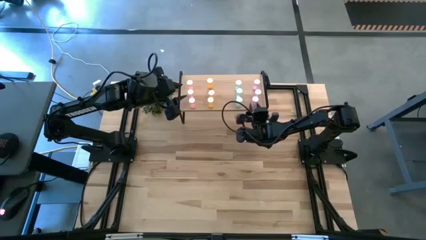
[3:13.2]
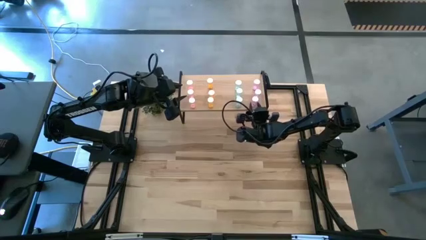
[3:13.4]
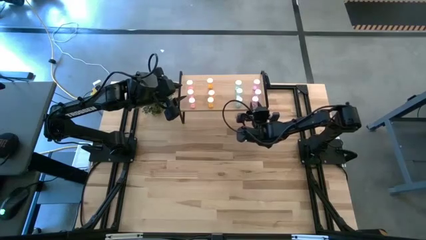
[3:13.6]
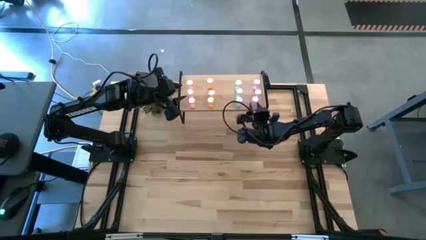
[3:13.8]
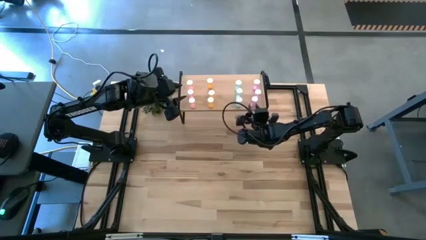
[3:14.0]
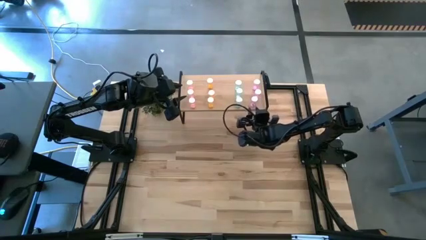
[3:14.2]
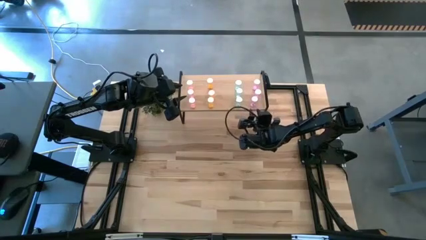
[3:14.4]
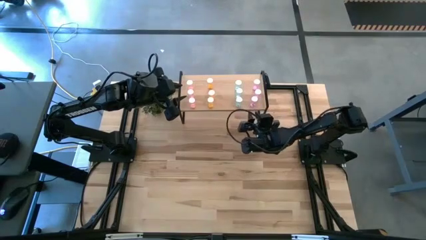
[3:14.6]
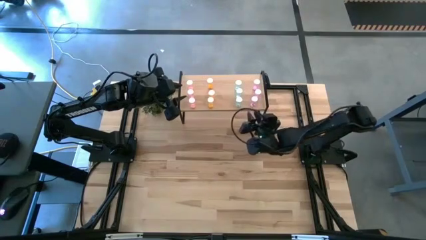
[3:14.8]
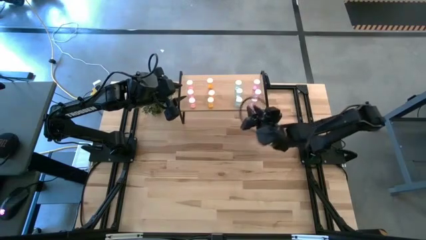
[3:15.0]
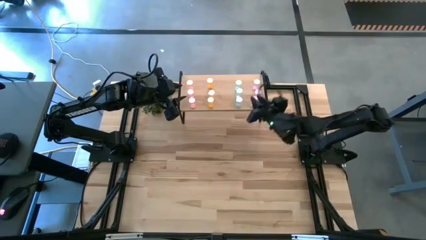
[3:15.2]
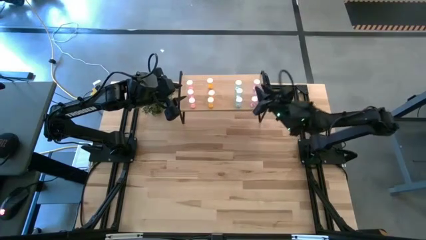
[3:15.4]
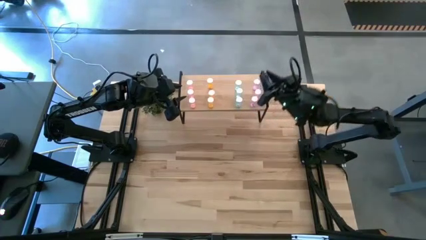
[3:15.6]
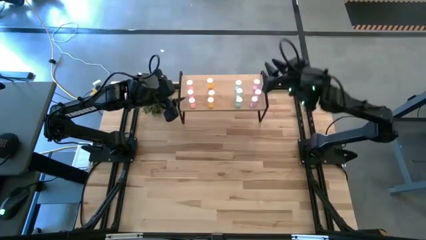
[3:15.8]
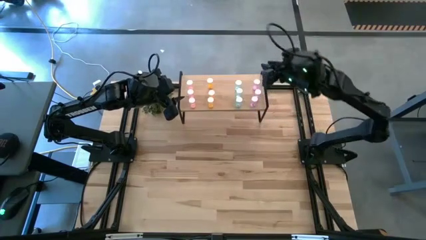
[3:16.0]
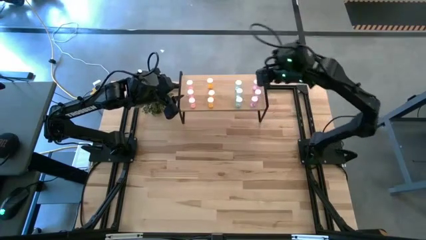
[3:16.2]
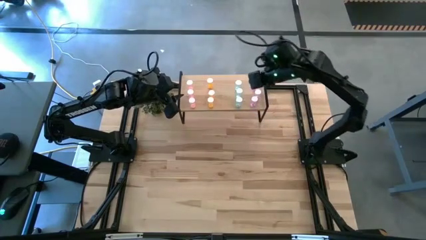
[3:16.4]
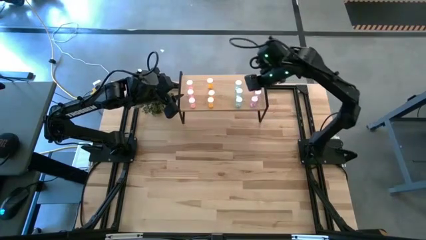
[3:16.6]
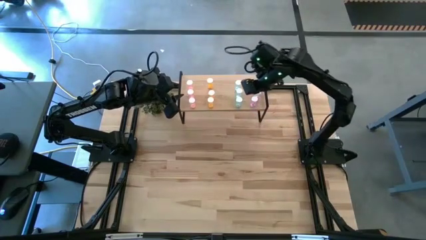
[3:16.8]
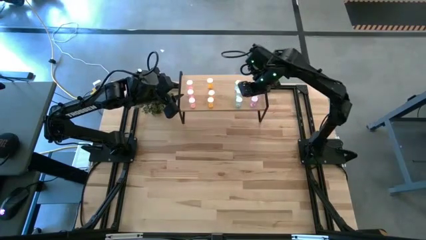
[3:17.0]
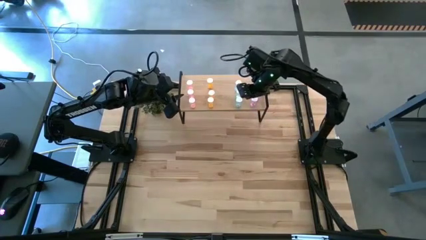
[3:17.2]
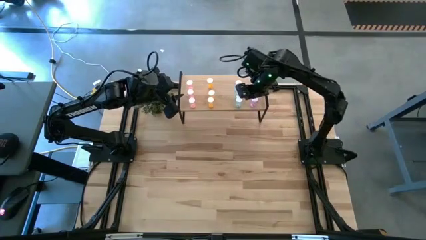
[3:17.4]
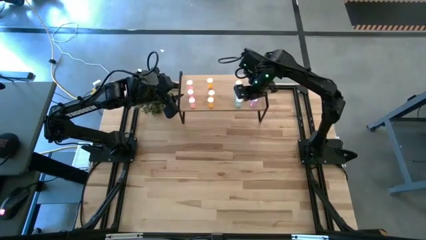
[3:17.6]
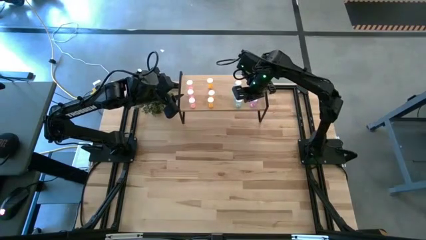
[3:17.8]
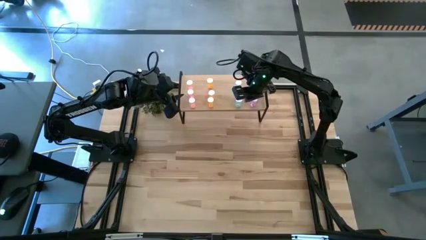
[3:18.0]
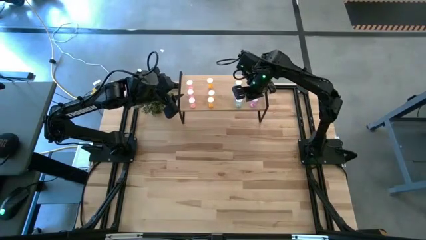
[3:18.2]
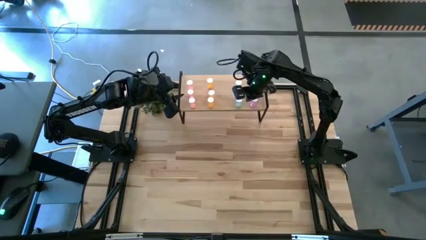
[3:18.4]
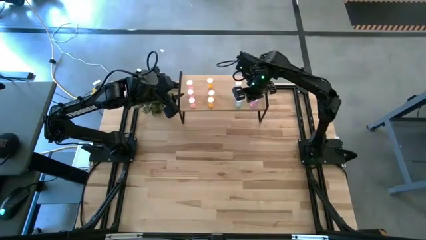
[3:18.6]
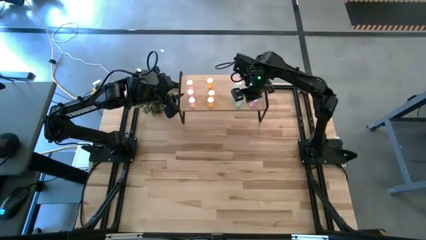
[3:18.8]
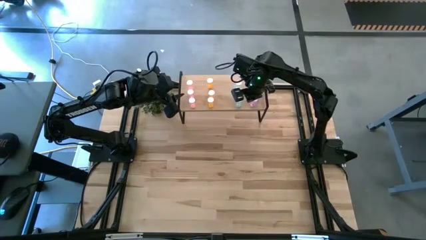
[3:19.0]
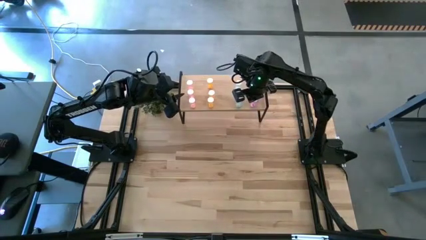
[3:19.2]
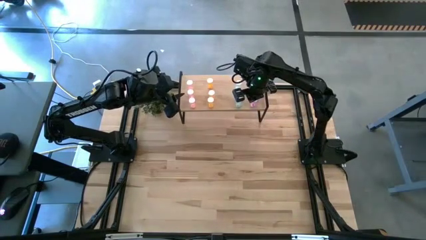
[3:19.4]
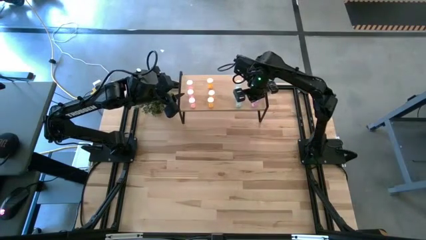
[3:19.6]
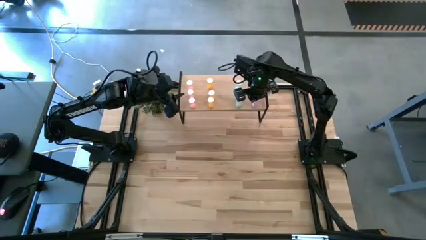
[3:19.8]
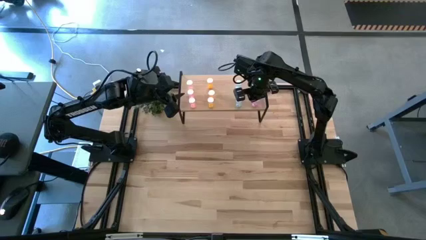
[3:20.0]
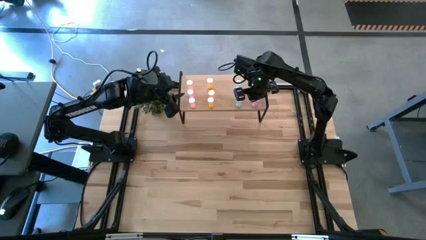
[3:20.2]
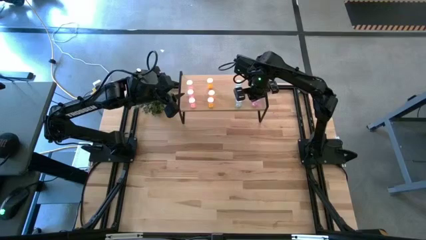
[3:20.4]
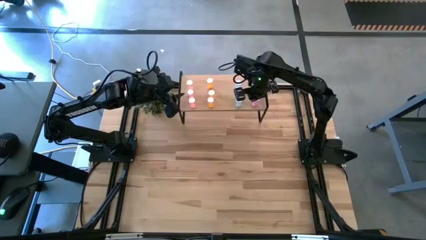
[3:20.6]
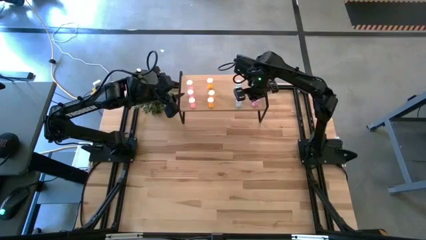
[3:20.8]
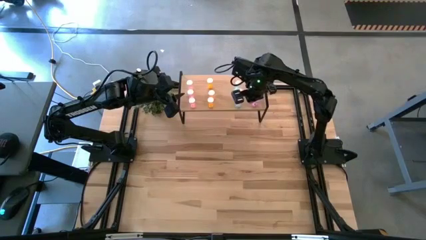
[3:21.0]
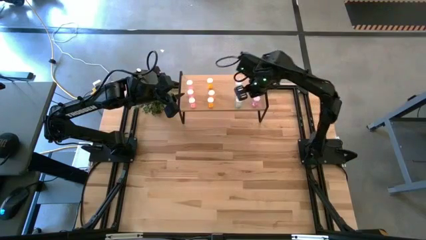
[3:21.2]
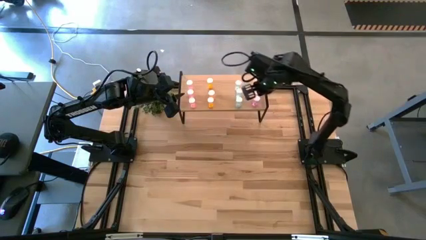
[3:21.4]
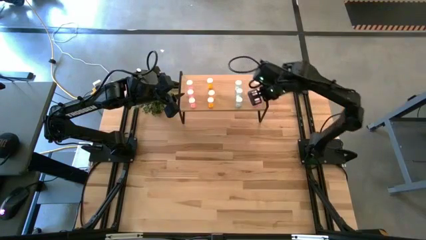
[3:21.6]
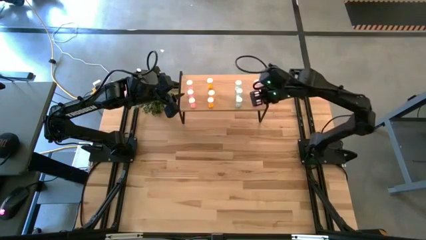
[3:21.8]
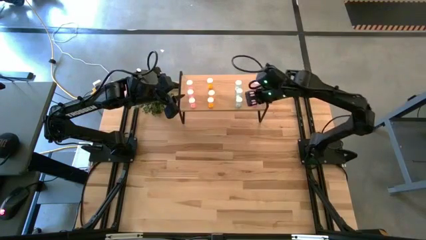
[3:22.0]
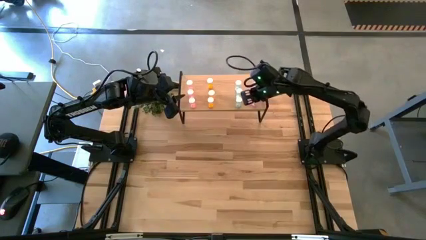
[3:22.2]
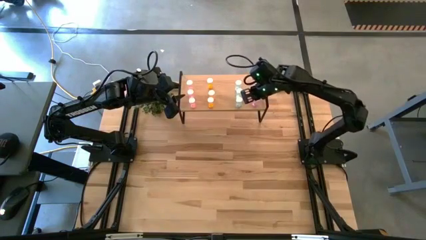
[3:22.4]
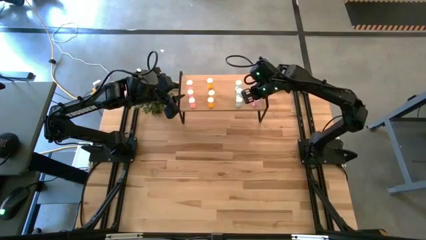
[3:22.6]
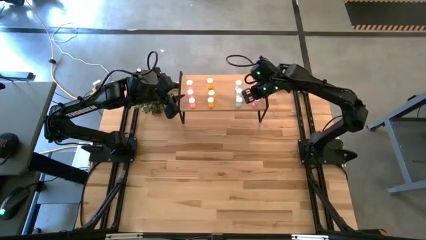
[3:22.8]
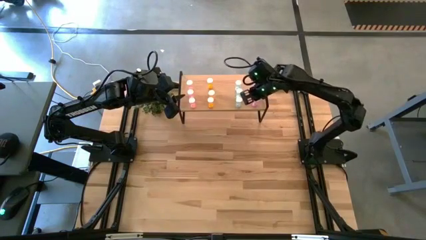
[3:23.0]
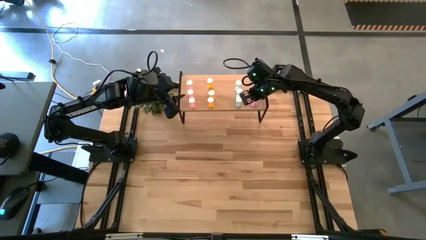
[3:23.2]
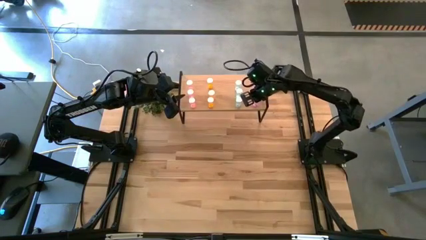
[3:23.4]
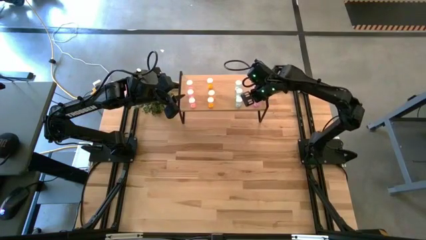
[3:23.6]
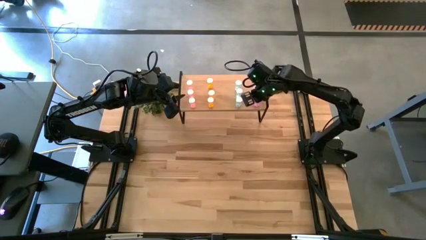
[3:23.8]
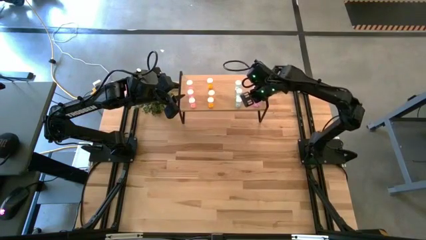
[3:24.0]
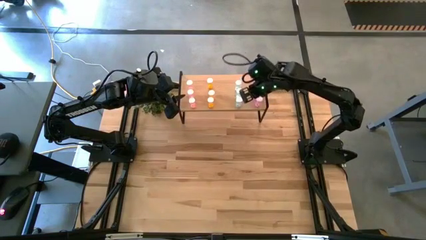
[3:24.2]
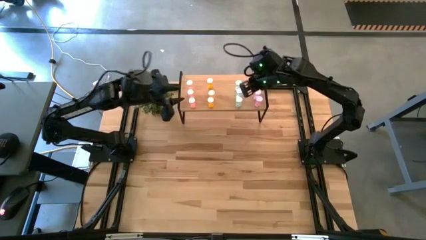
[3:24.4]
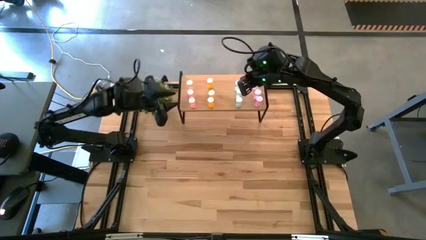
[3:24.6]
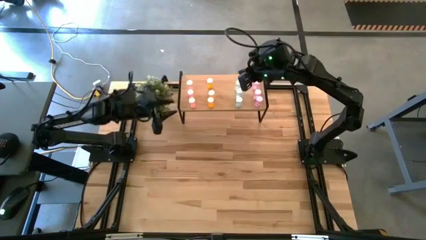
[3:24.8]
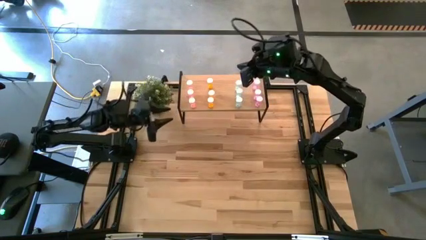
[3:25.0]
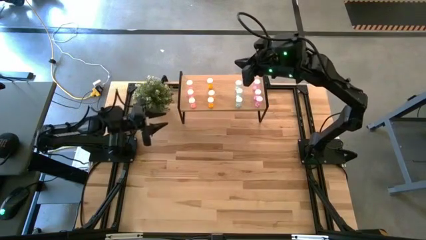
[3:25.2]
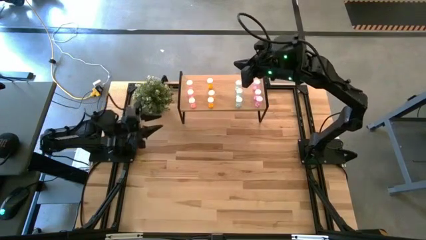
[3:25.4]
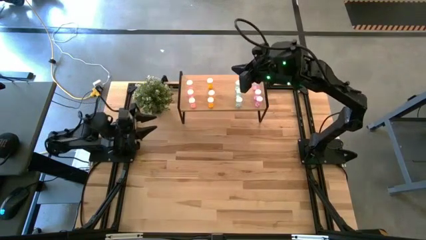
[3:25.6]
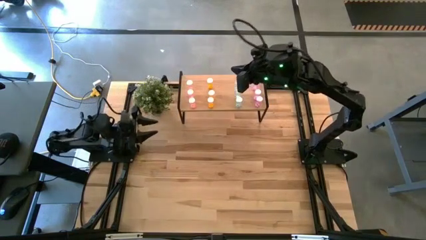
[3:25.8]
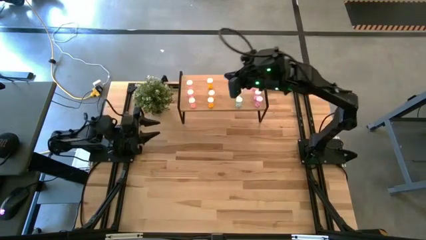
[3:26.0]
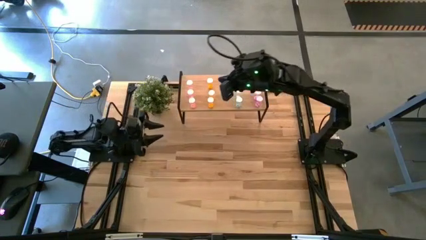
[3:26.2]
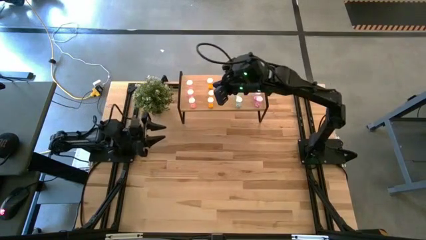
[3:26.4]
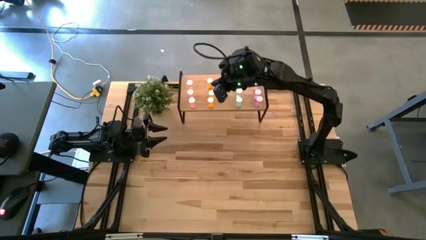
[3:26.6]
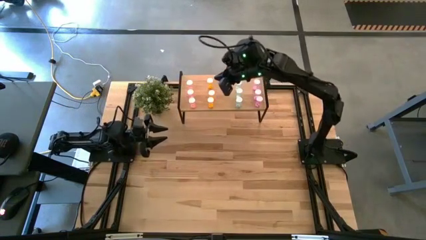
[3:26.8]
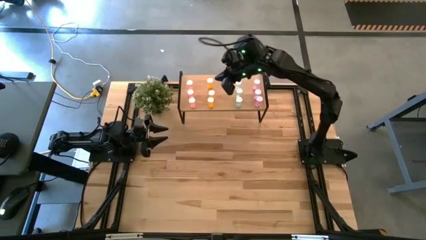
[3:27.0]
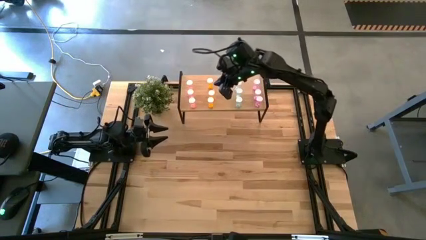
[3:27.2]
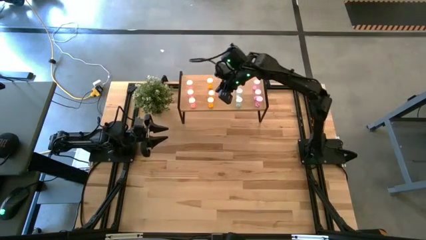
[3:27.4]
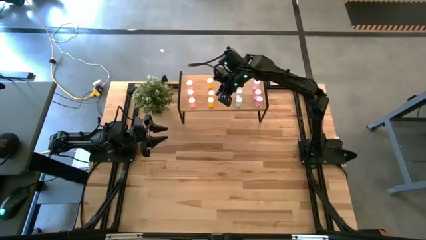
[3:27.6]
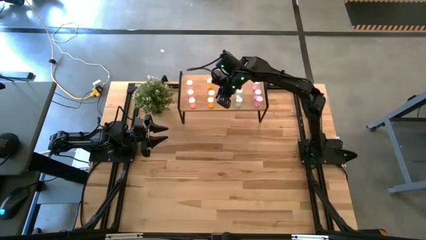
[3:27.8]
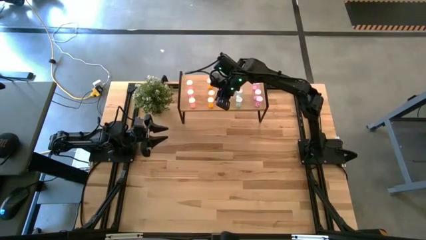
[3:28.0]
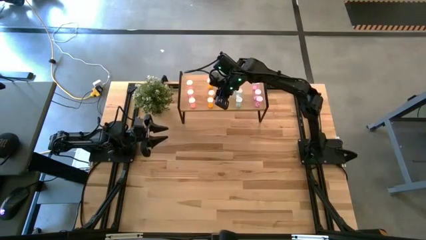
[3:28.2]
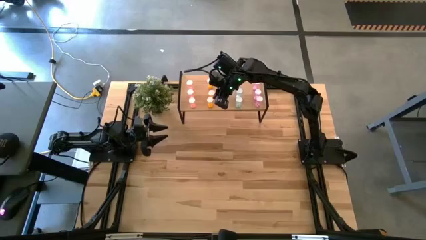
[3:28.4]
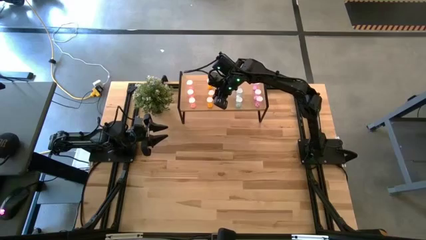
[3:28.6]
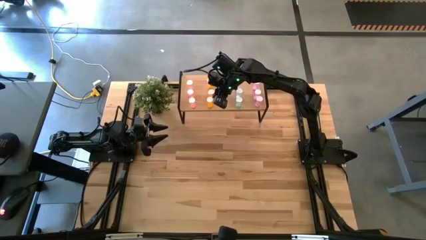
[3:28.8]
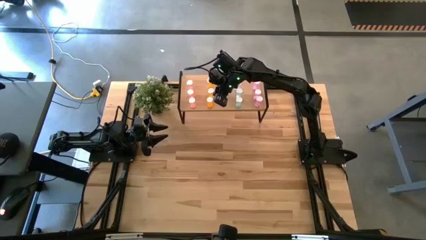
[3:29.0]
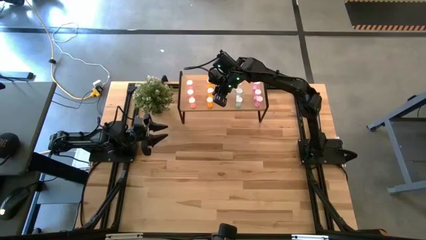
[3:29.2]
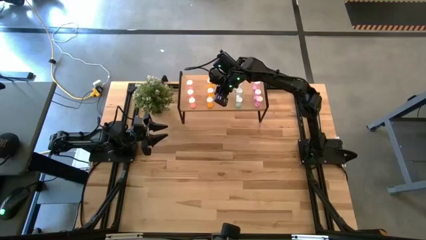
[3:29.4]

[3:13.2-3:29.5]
Task: Pick and place medicine bottles onto shelf by color
Adjust the pill bottles
